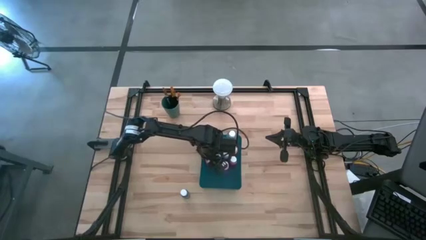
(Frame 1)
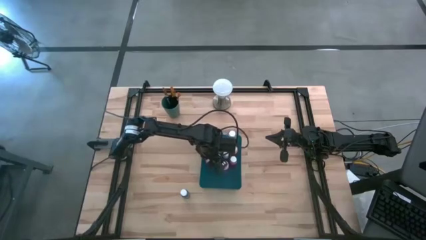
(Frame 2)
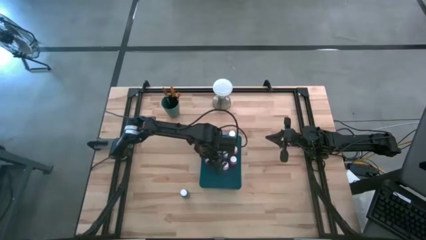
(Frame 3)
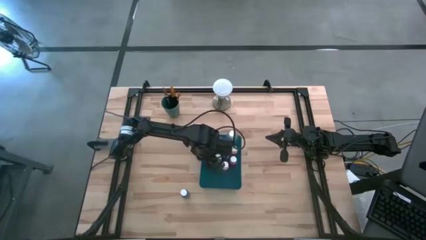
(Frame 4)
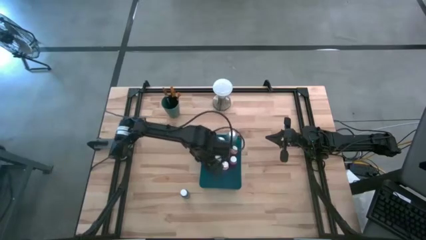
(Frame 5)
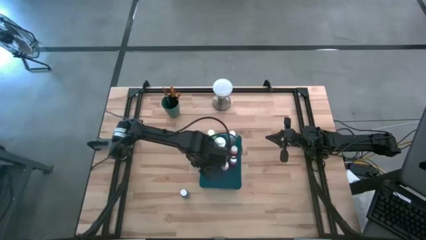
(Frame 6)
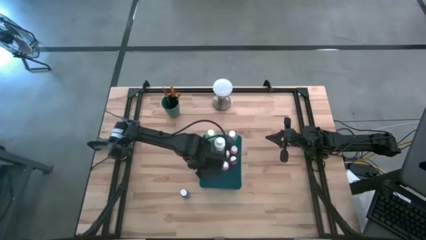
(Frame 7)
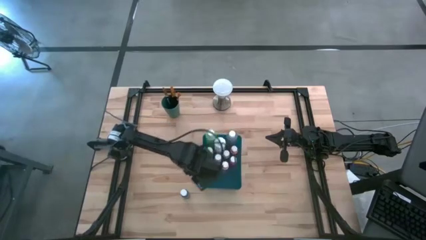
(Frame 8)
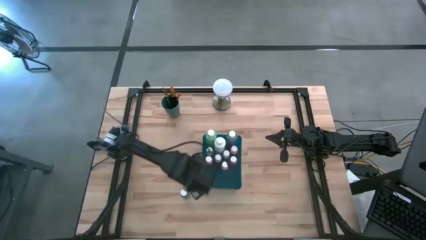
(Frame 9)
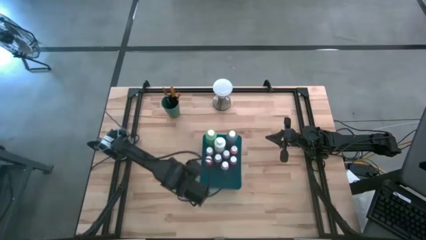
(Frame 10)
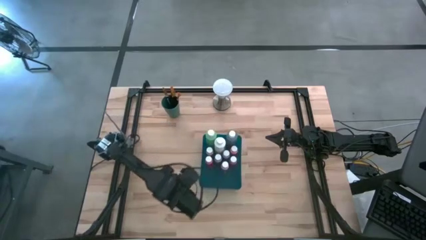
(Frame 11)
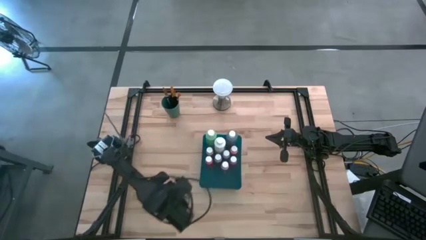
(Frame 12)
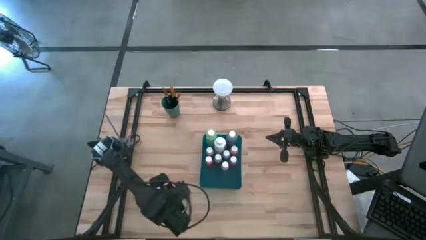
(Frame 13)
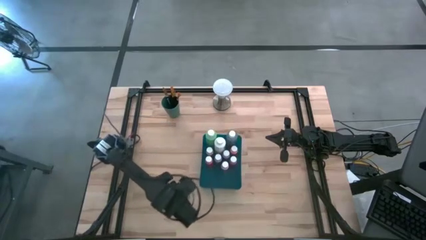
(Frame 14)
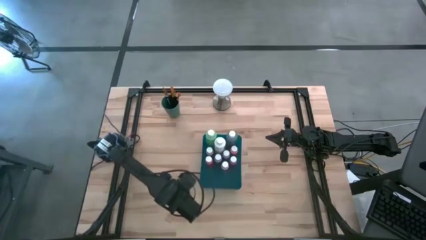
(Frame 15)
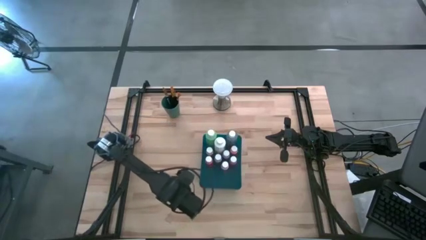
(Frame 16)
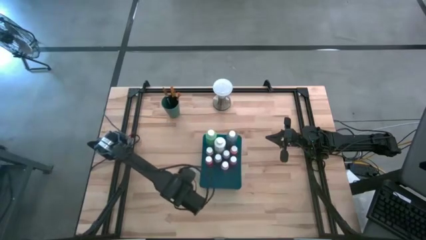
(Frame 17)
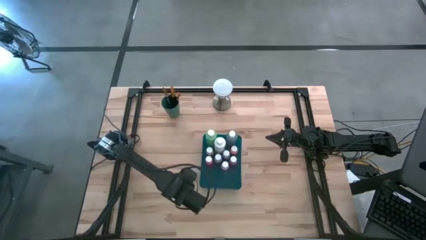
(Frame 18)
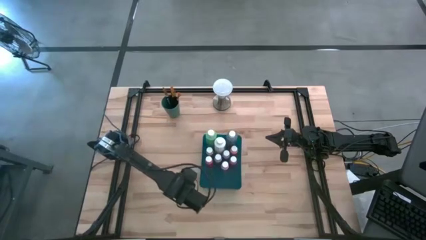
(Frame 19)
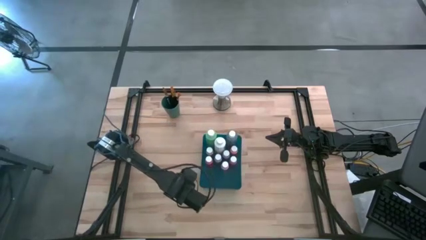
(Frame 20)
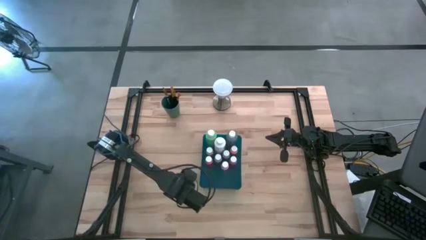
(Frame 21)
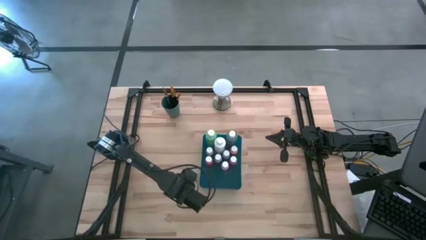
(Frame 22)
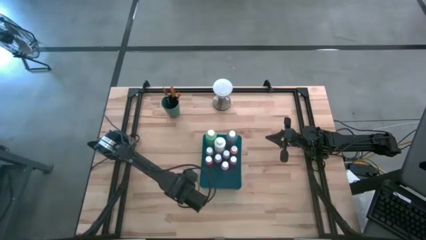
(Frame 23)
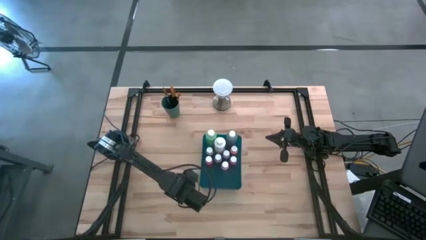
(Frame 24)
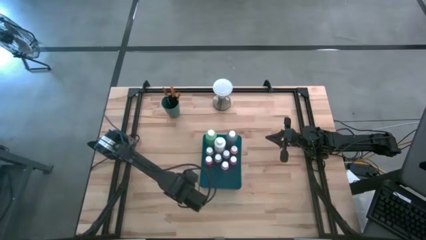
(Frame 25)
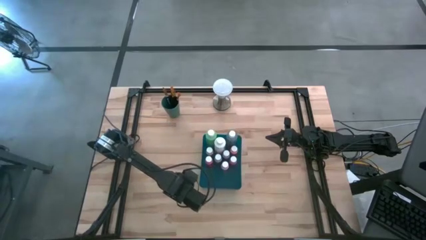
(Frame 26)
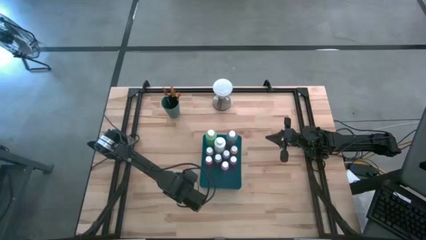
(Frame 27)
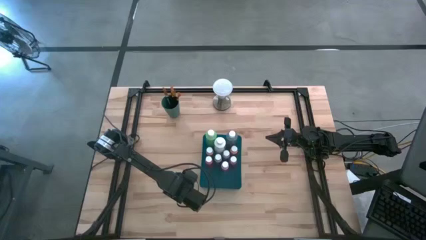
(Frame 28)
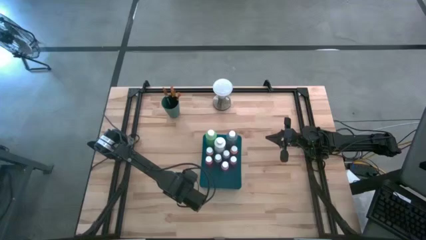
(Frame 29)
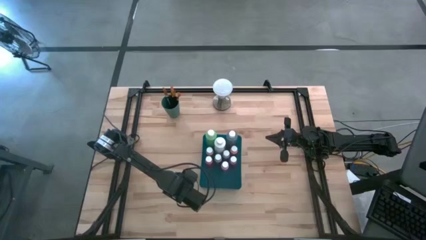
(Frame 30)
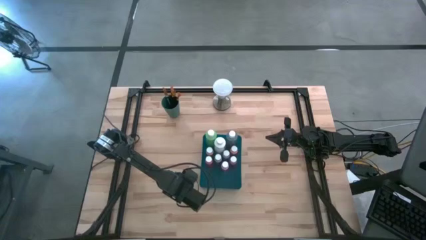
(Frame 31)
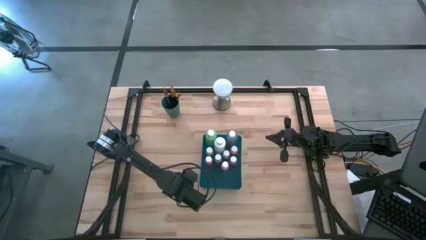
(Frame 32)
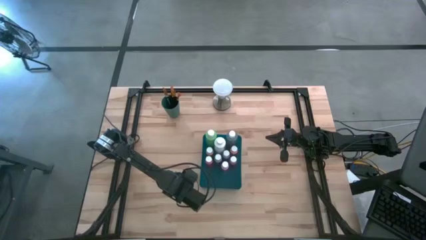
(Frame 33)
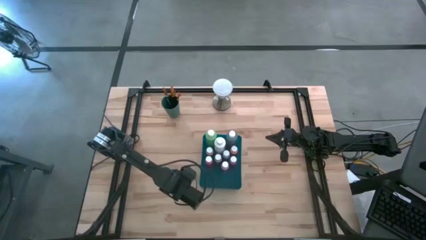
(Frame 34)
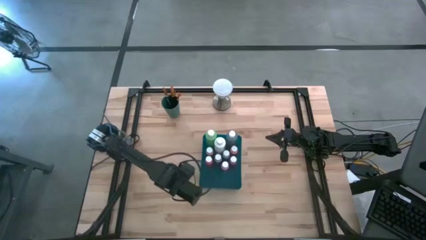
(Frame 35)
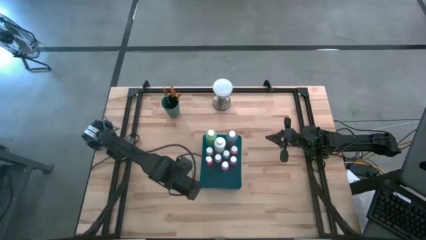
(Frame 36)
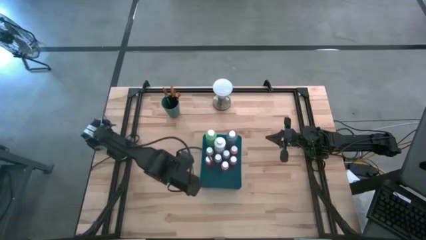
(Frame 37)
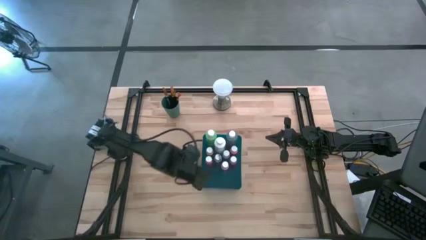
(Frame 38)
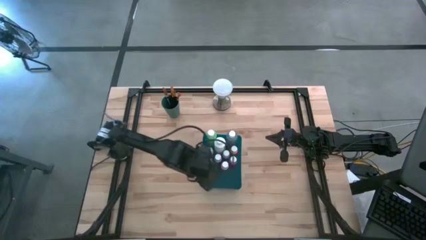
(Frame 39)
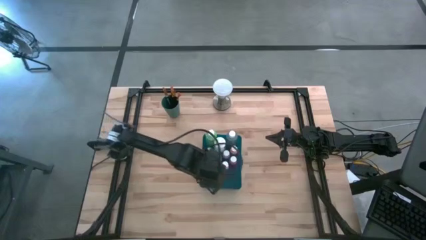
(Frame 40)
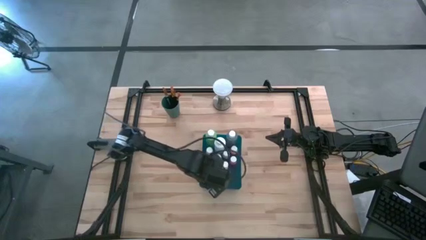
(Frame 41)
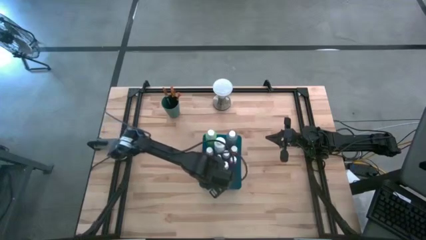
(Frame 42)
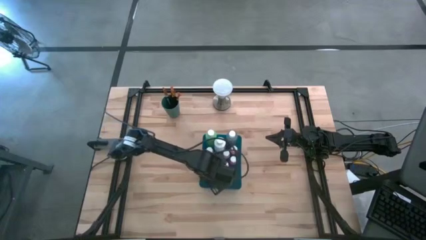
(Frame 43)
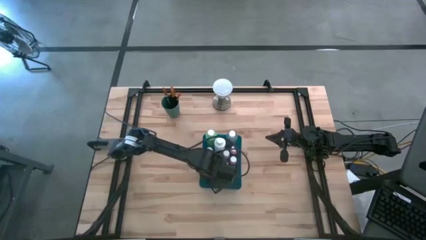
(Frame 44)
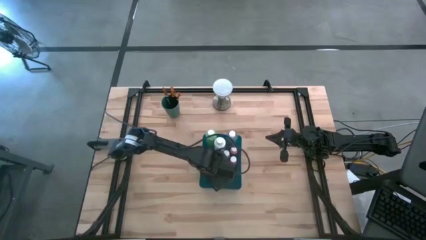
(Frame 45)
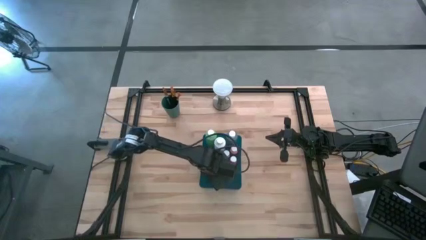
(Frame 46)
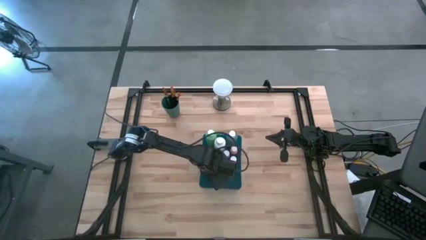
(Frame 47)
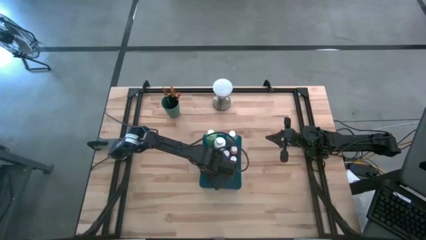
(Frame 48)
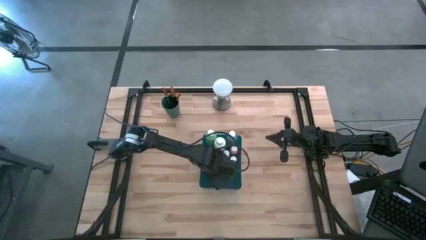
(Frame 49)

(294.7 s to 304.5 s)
Task: Pick & Place Paint Supplies
Put the blue paint bottle into the blue bin

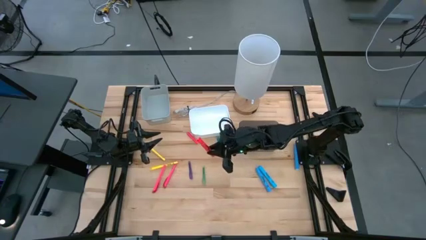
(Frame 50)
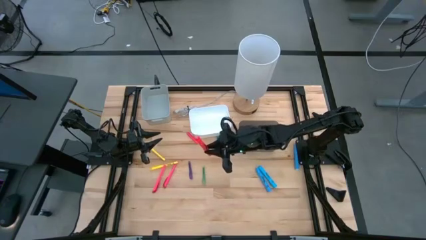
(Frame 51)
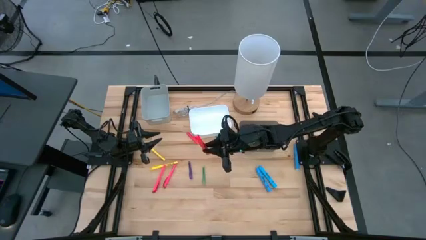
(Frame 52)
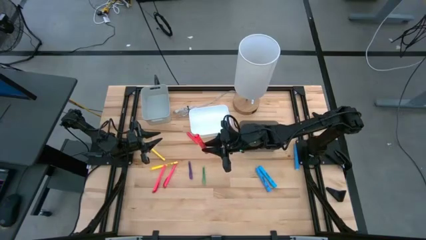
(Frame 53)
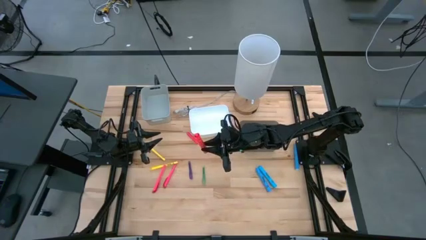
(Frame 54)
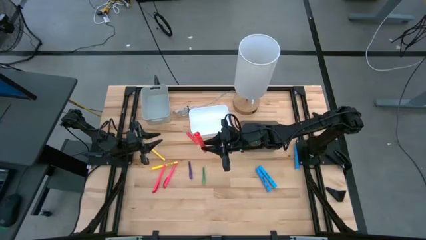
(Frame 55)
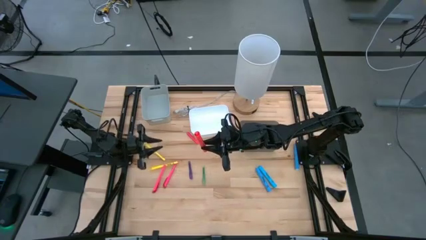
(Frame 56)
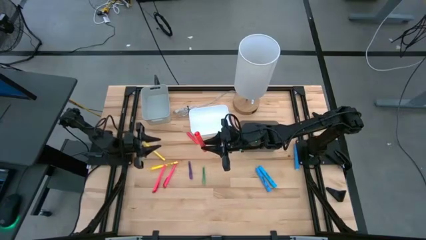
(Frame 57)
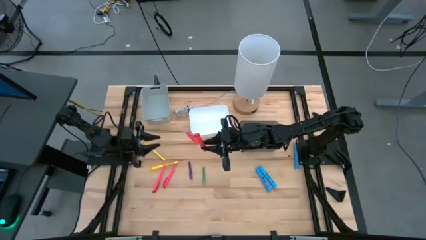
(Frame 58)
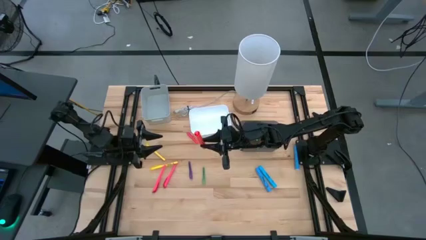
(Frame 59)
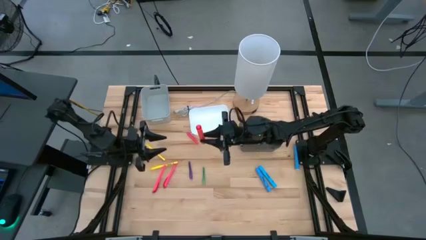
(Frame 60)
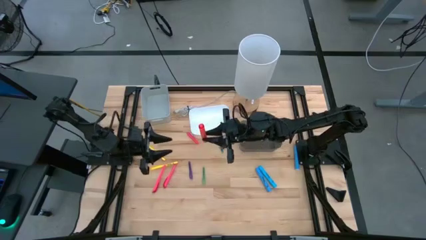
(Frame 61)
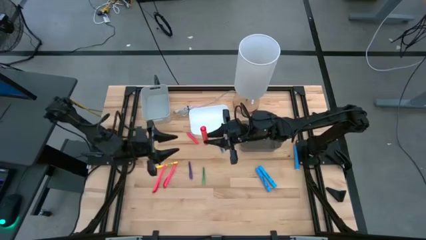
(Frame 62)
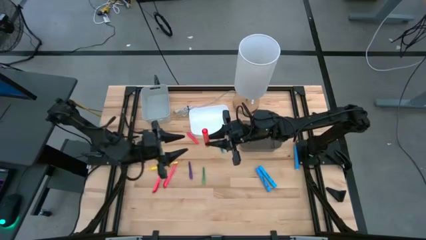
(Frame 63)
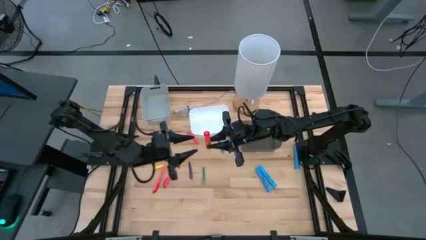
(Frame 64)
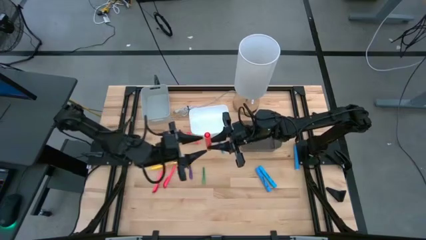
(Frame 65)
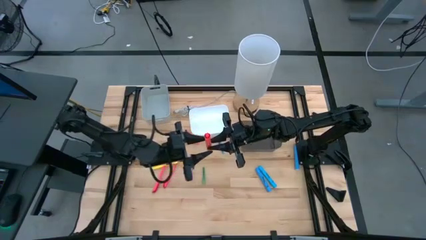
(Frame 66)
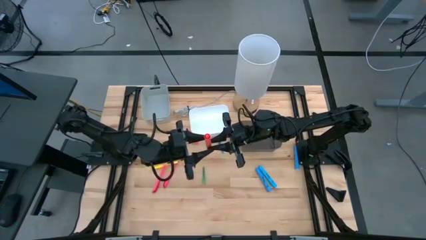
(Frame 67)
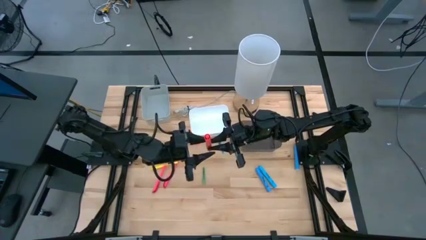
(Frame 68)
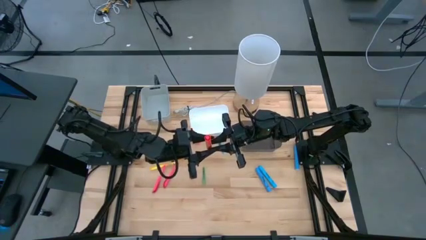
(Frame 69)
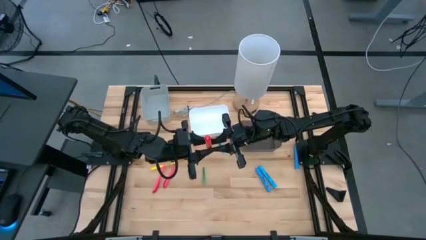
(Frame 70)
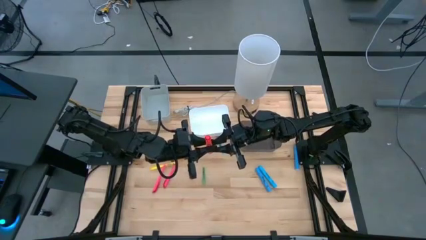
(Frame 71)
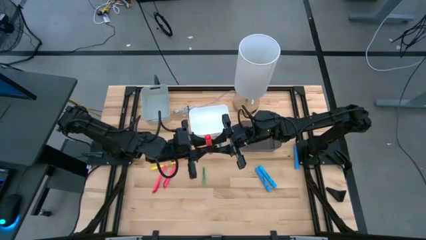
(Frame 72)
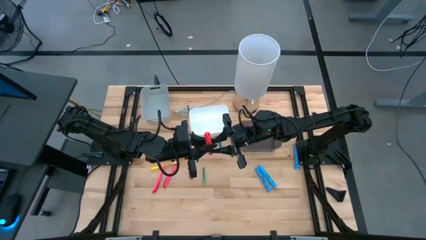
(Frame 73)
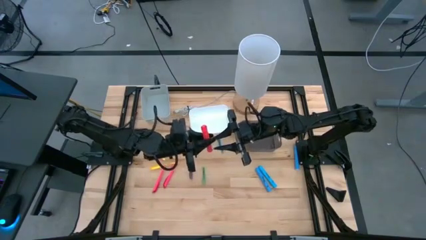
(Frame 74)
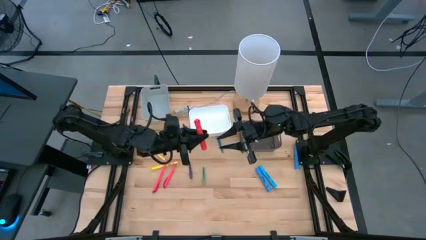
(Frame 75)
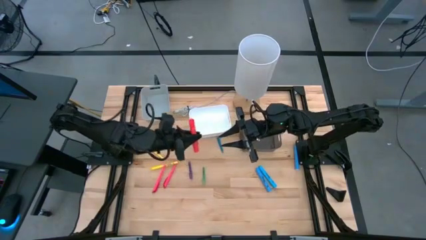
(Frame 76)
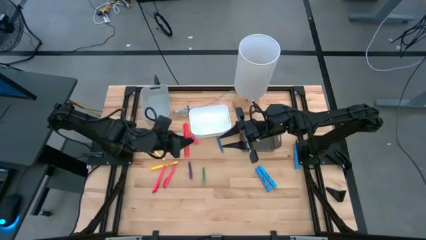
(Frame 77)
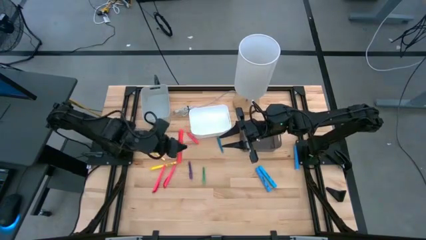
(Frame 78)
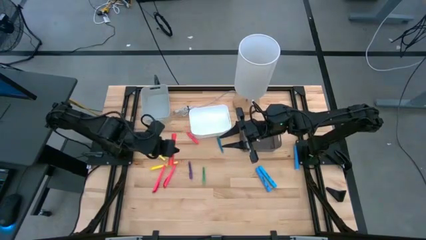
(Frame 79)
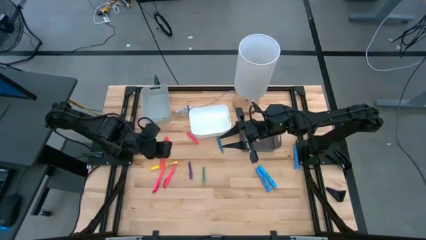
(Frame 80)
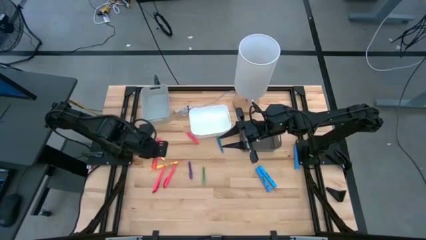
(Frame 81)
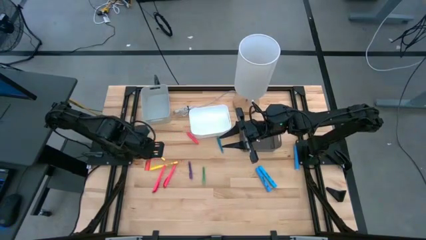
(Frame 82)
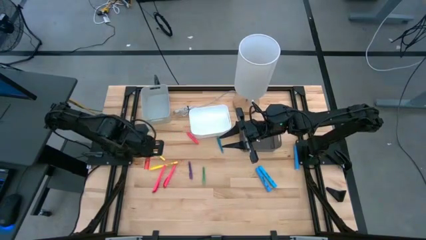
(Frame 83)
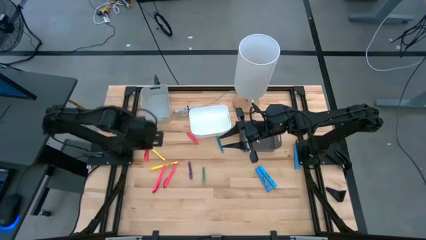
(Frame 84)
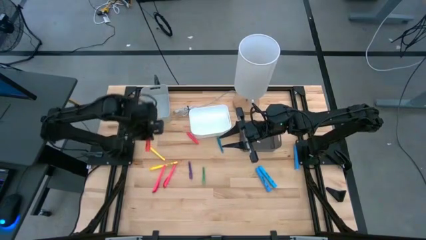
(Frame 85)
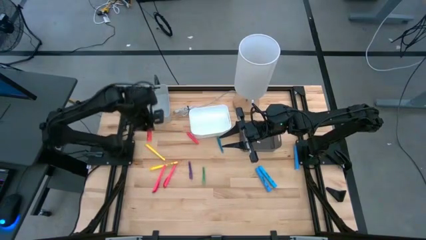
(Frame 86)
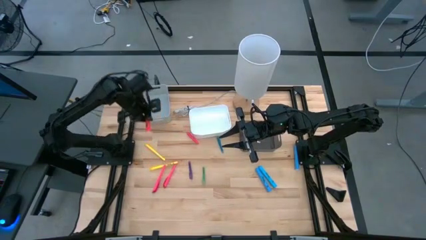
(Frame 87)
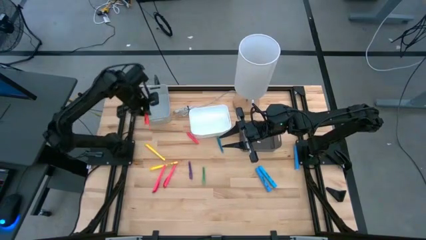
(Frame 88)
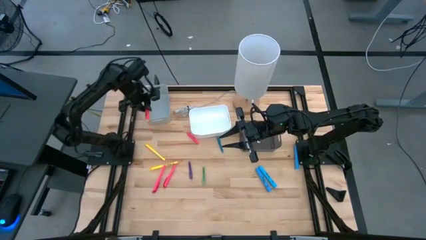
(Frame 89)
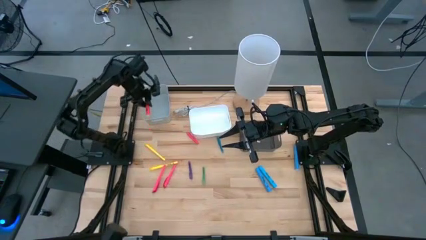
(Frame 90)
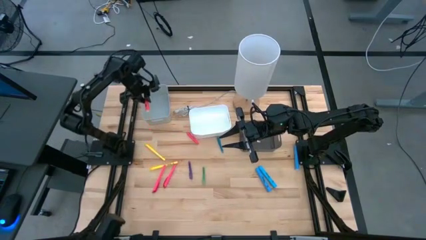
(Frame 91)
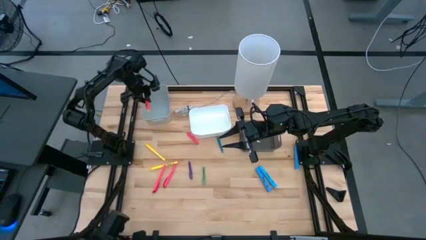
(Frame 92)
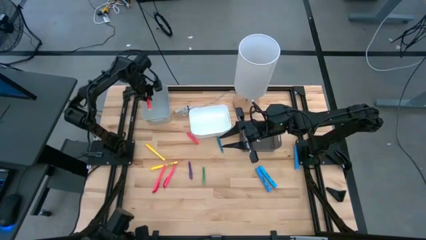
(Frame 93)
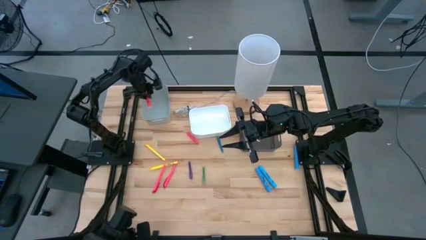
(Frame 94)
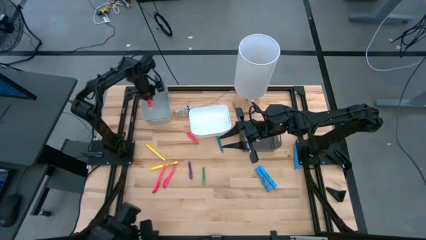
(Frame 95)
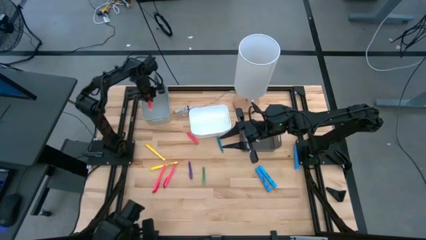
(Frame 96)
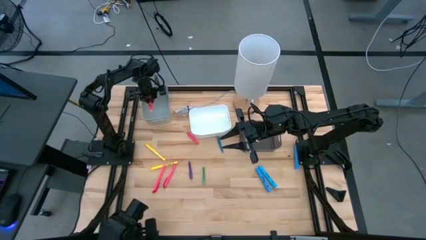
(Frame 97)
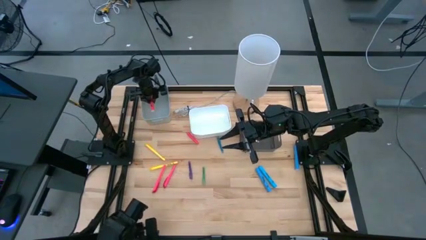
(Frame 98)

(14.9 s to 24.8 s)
Task: Pick & Place Markers
Put the orange highlighter pen into the gray bin
